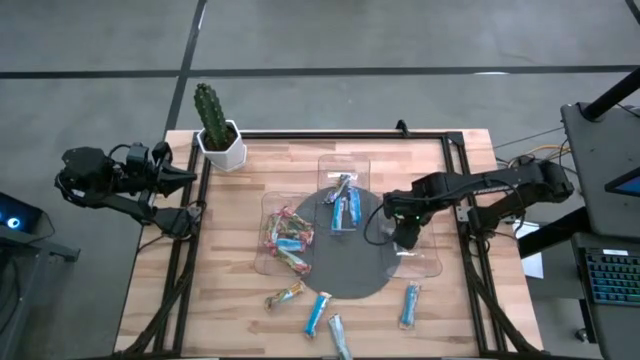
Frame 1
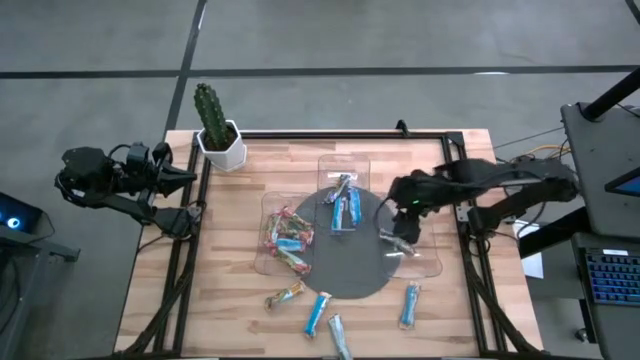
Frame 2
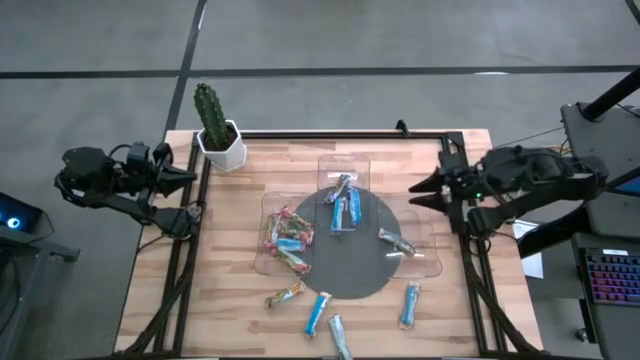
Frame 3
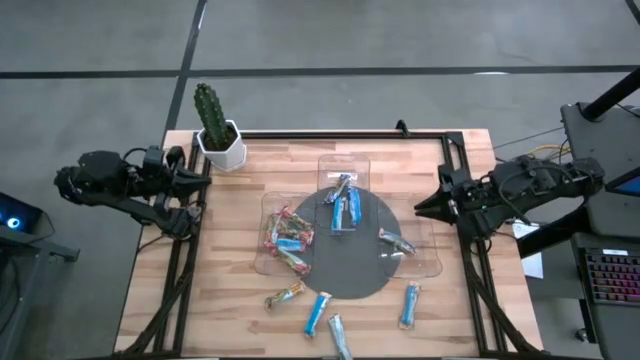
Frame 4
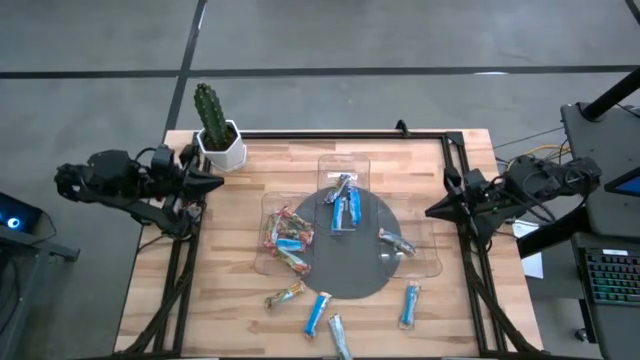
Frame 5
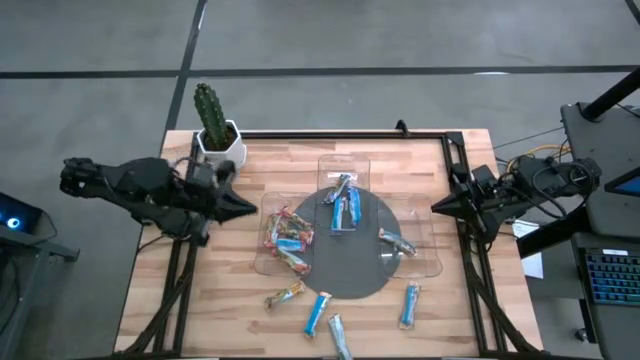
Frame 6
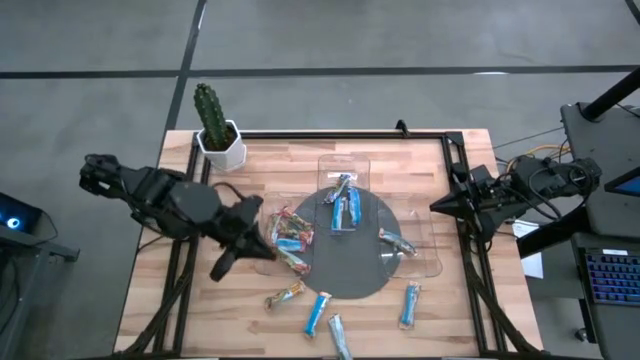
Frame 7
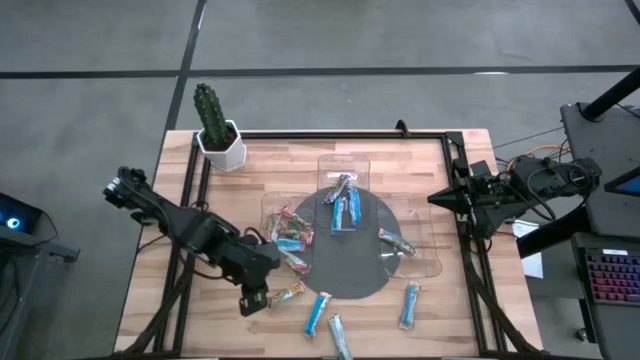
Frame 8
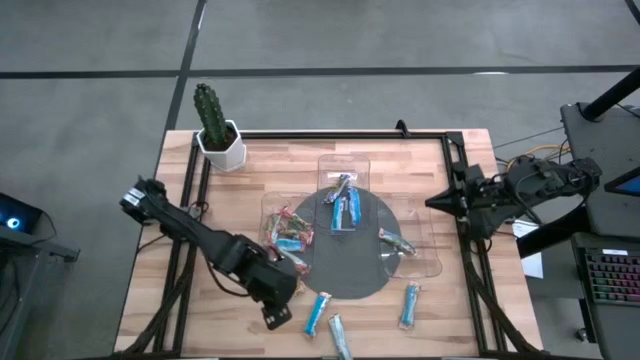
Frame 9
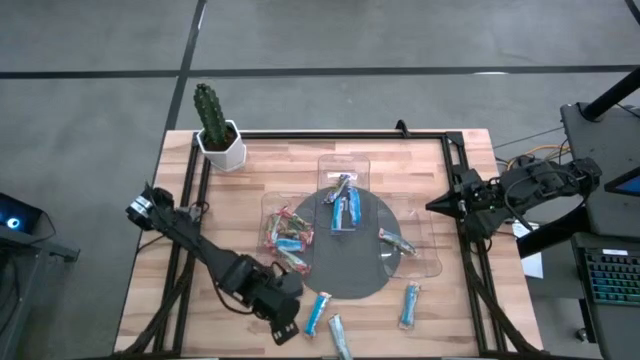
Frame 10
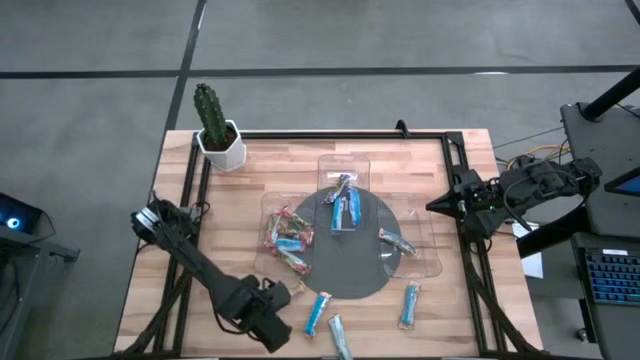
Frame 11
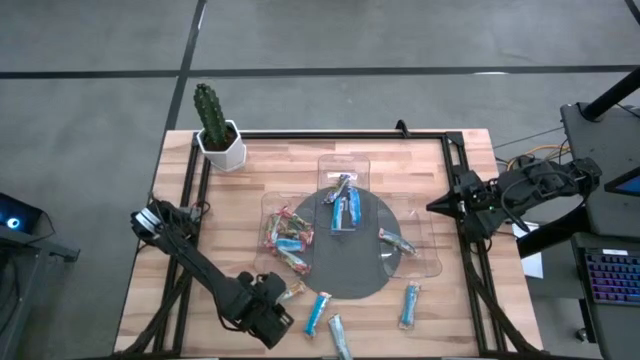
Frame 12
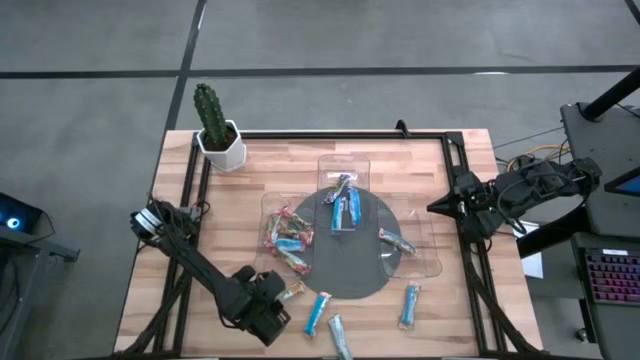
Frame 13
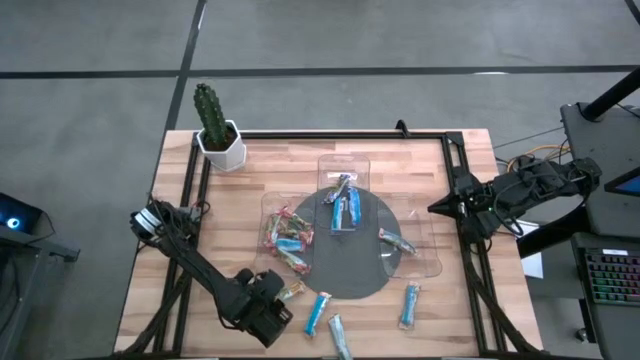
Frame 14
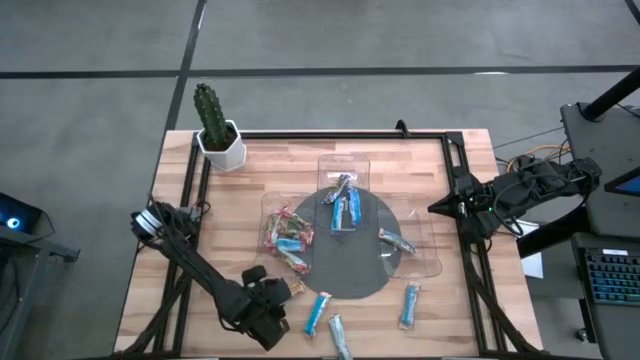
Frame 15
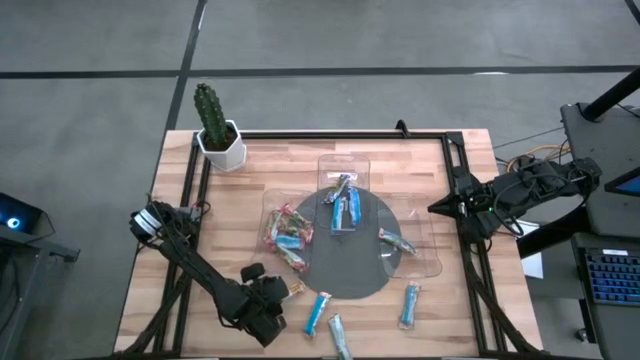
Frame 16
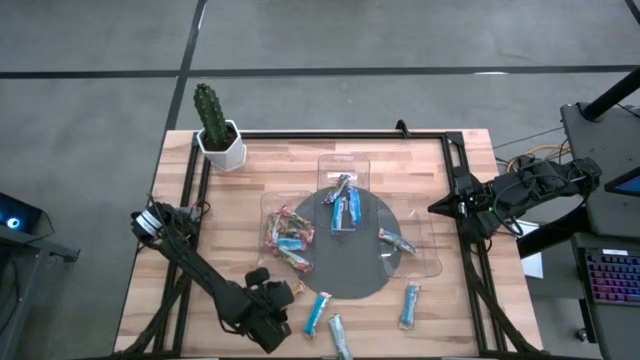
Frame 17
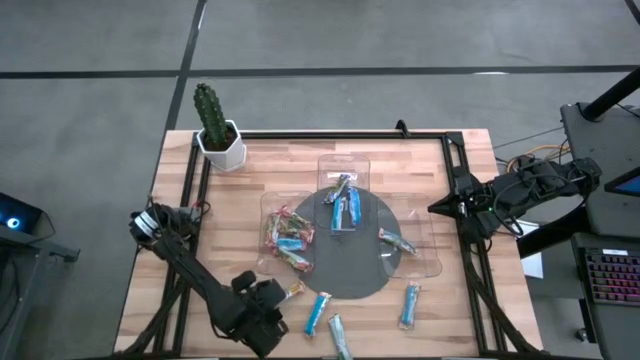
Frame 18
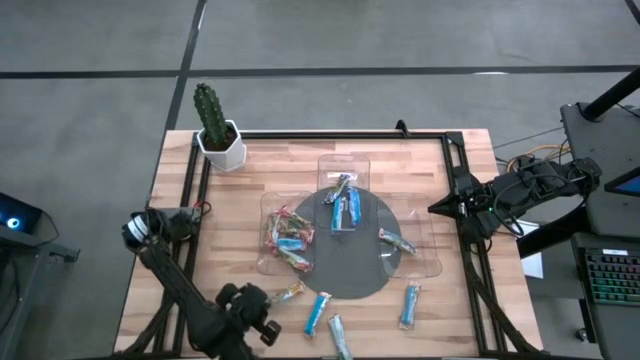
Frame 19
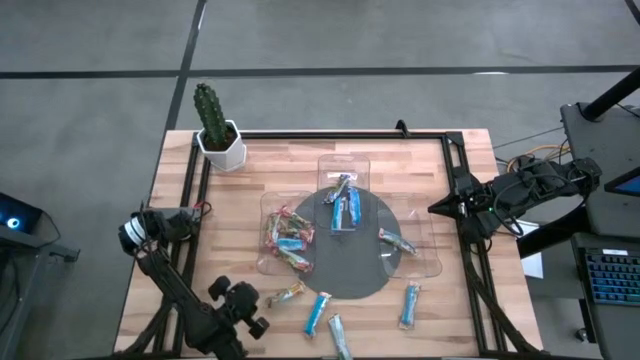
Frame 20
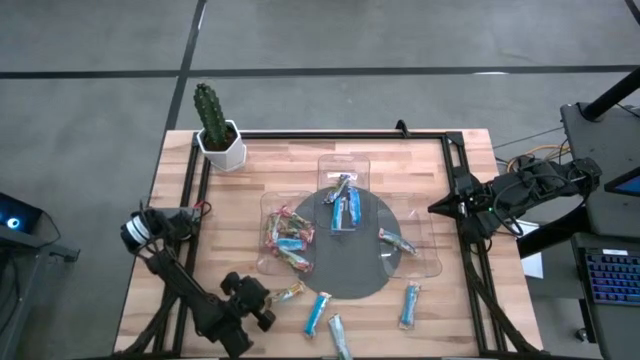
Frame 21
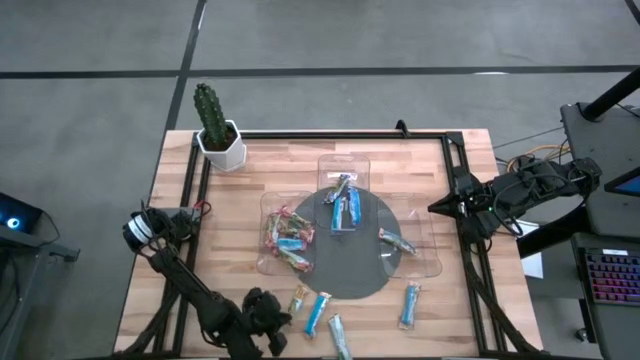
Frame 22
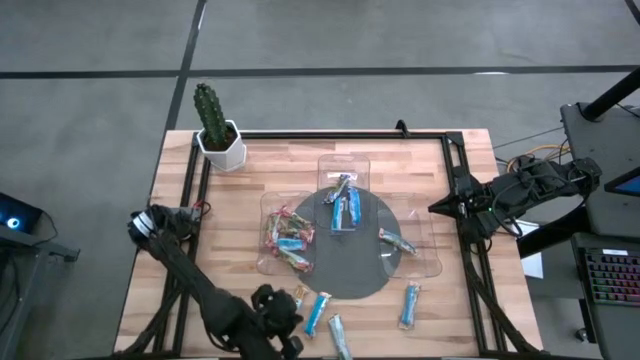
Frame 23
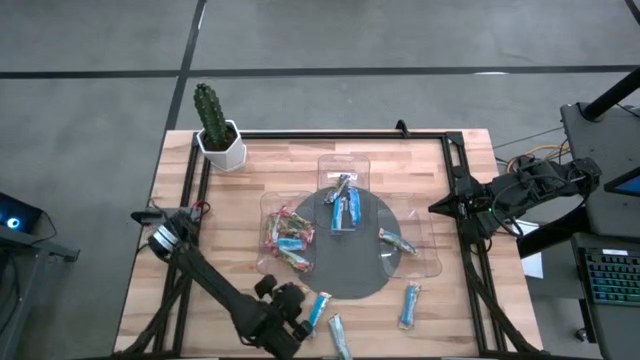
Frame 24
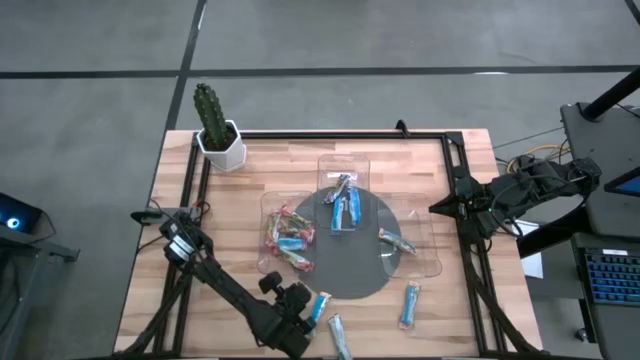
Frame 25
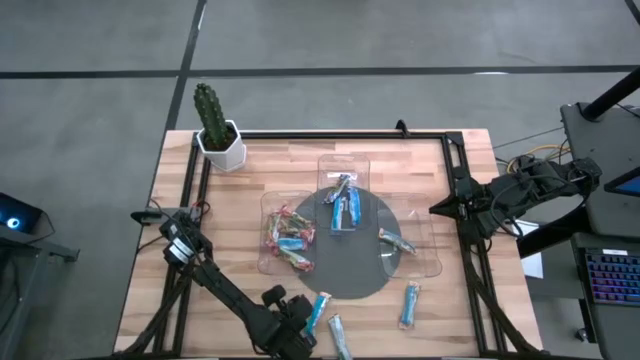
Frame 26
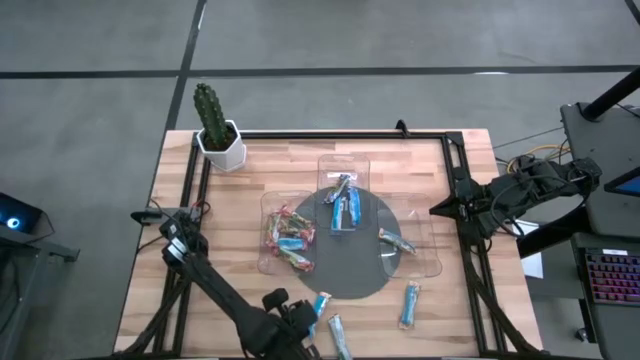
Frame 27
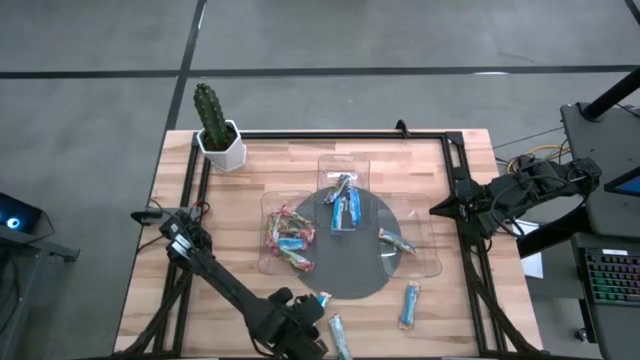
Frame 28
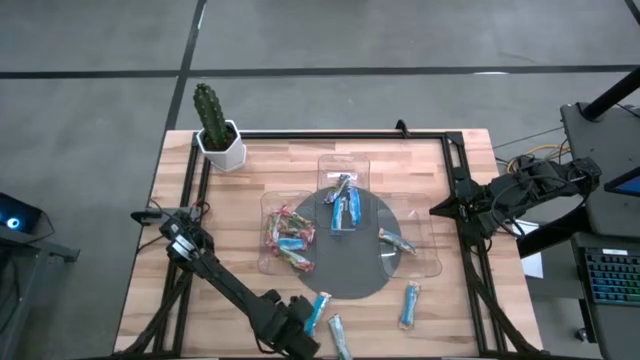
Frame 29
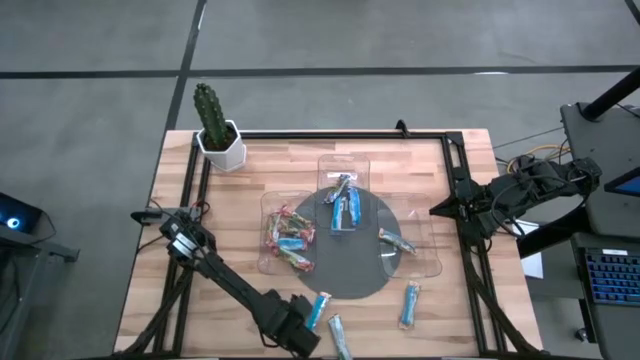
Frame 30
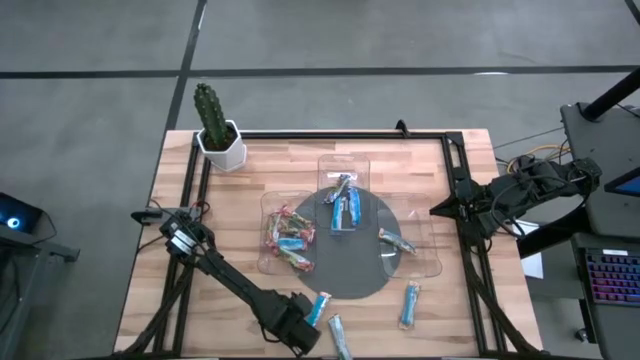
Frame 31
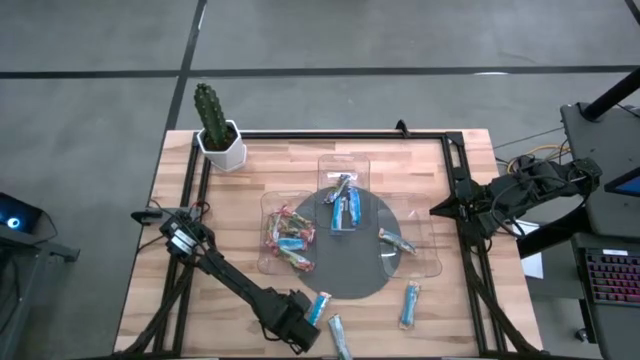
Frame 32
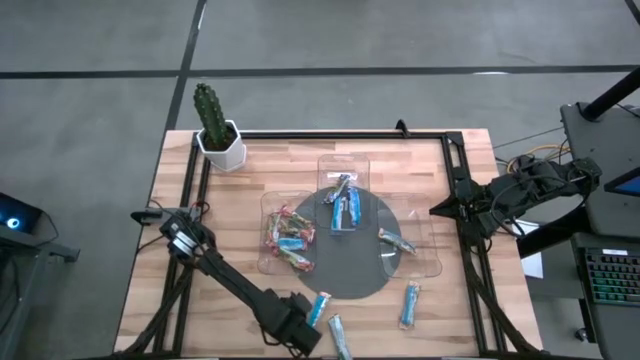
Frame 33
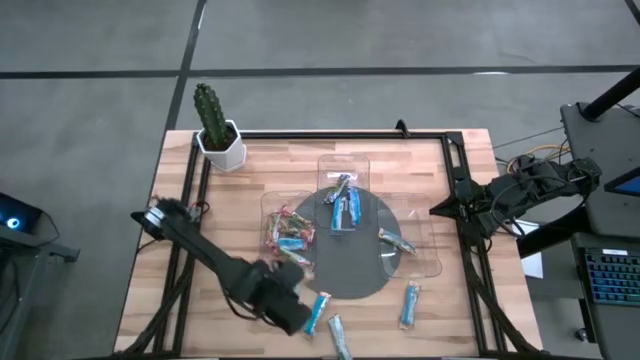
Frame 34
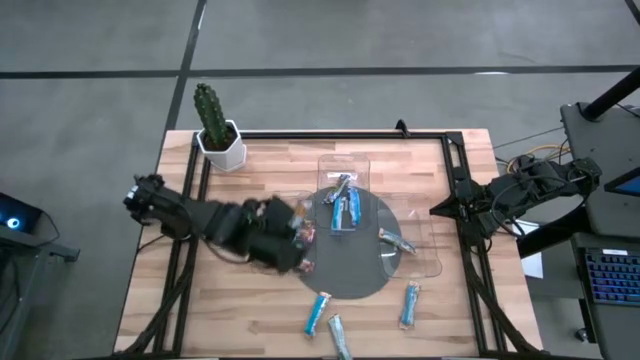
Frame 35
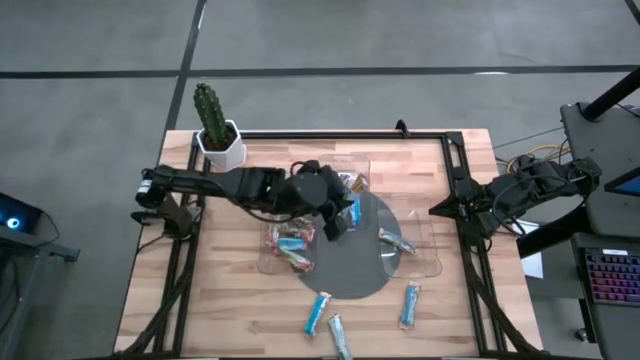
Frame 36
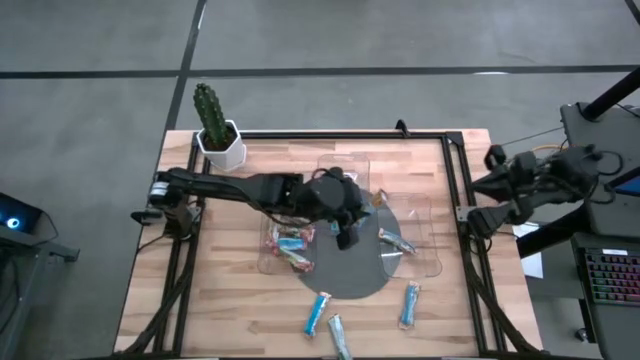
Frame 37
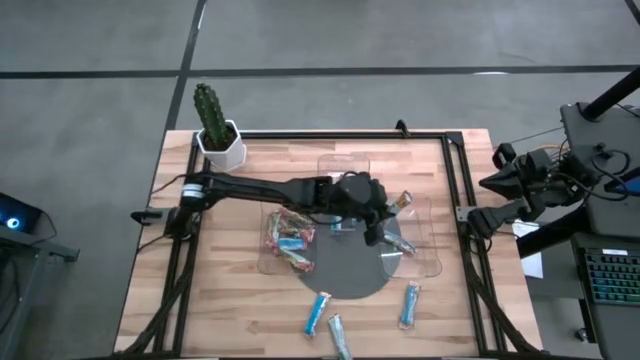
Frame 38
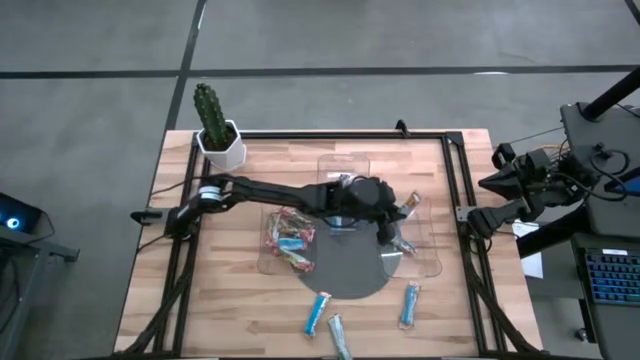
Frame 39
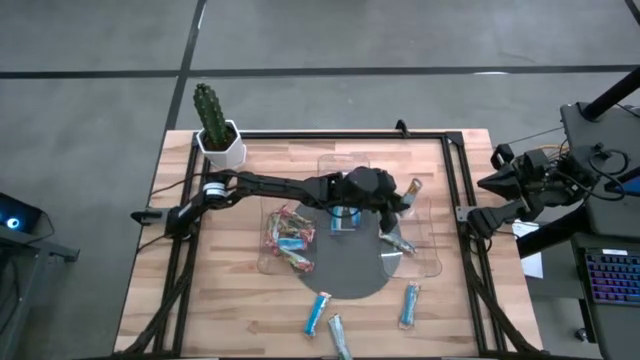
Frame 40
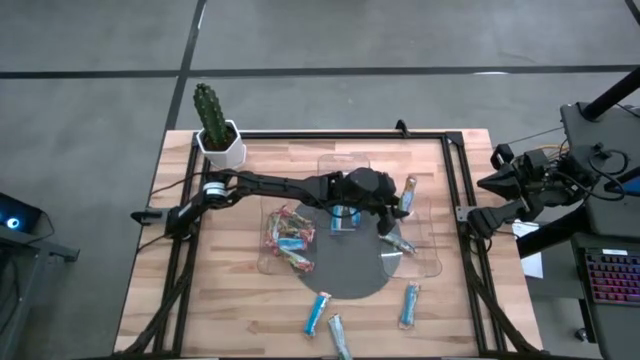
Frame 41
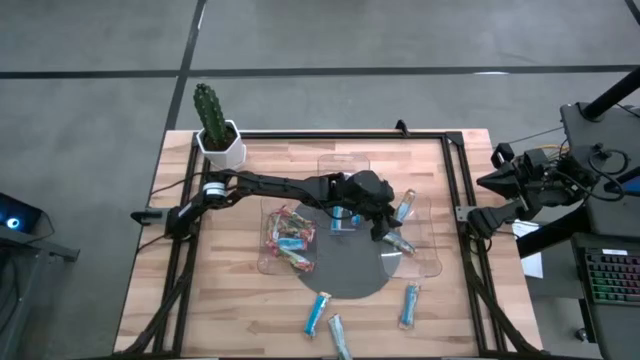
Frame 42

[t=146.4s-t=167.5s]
Task: Pick and place Granola Bars by type
Put the yellow granola bar into the right transparent bin
